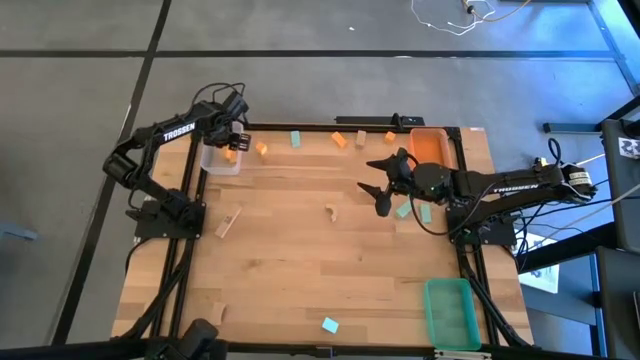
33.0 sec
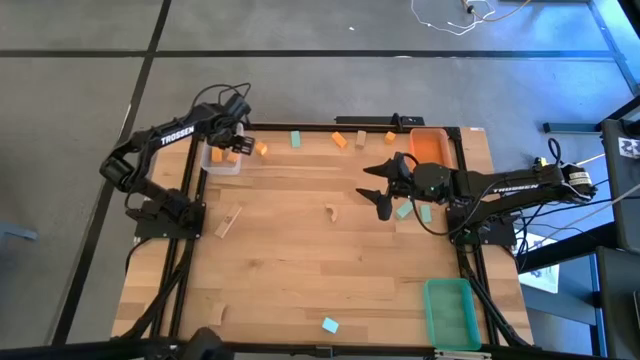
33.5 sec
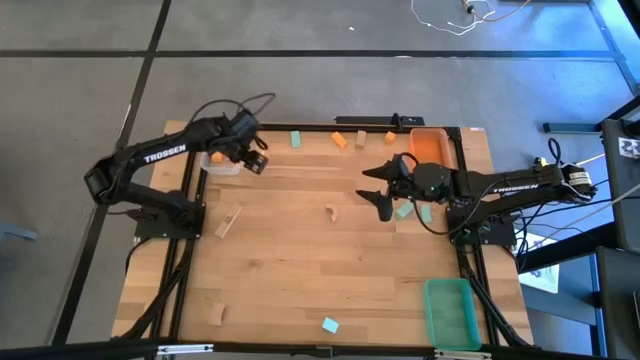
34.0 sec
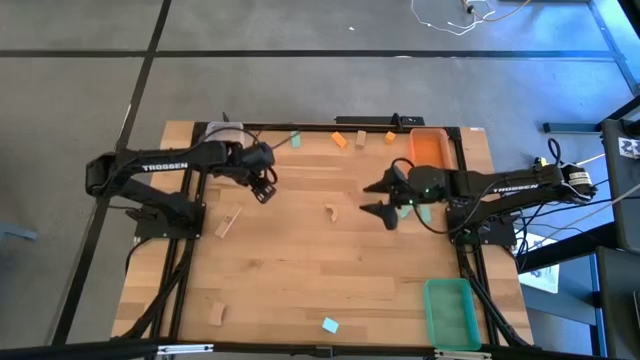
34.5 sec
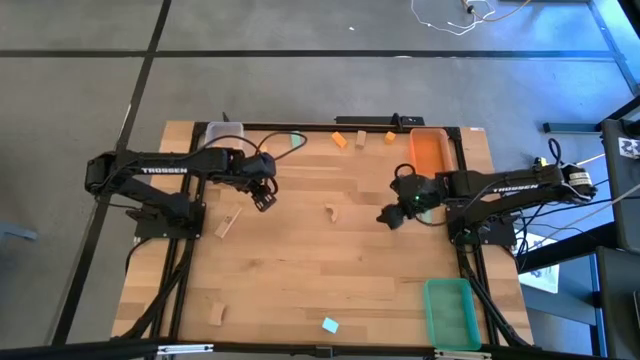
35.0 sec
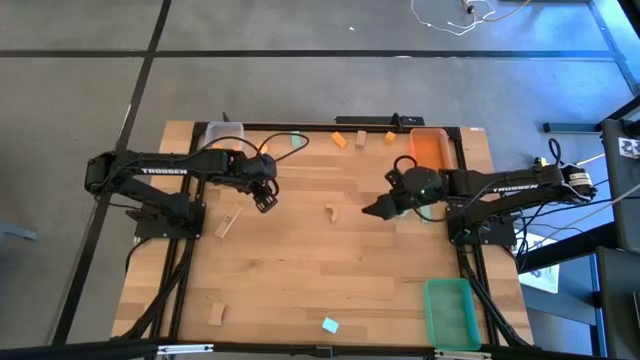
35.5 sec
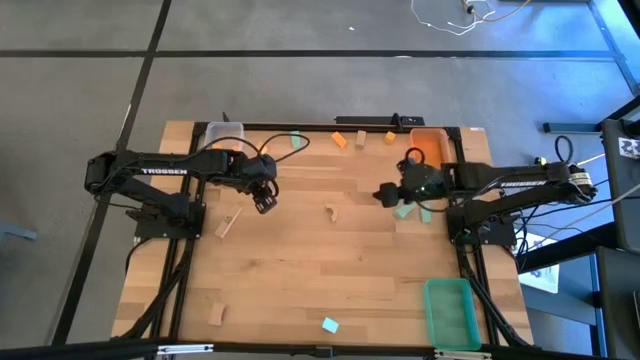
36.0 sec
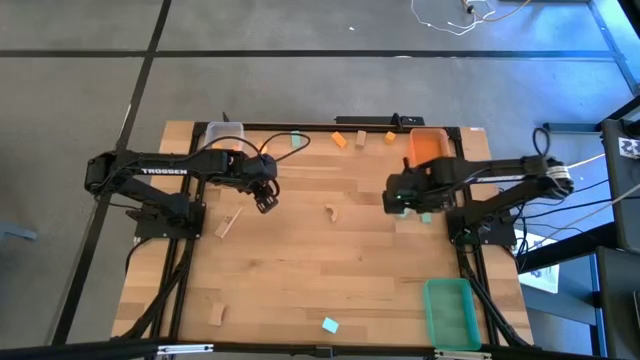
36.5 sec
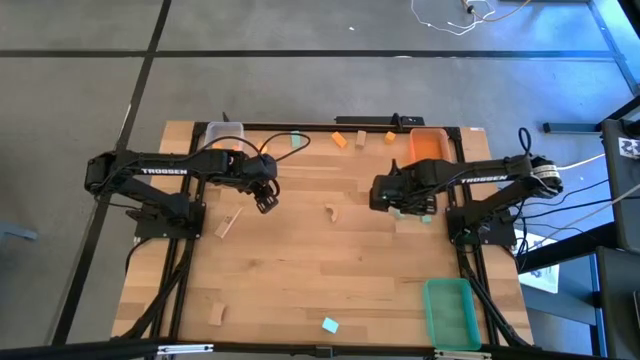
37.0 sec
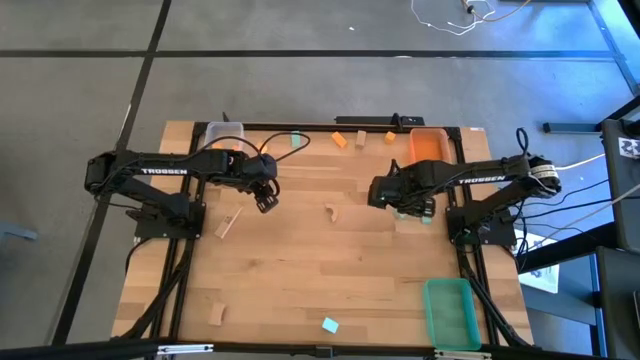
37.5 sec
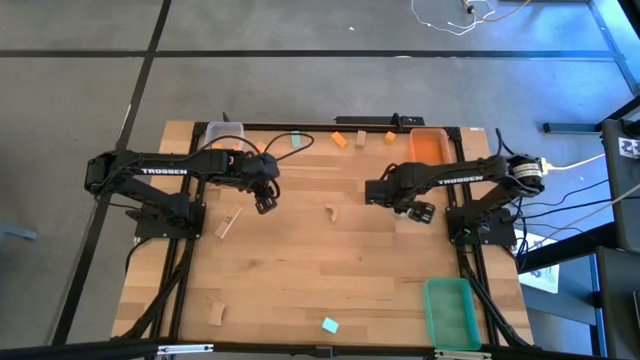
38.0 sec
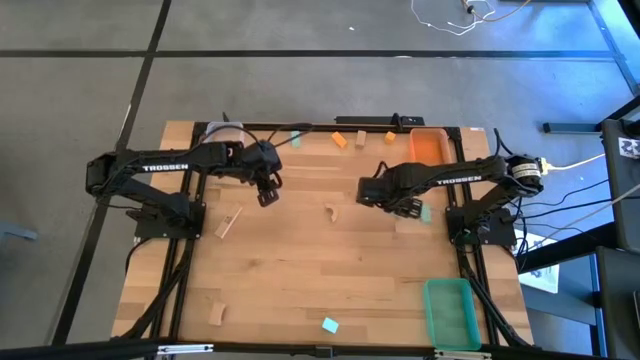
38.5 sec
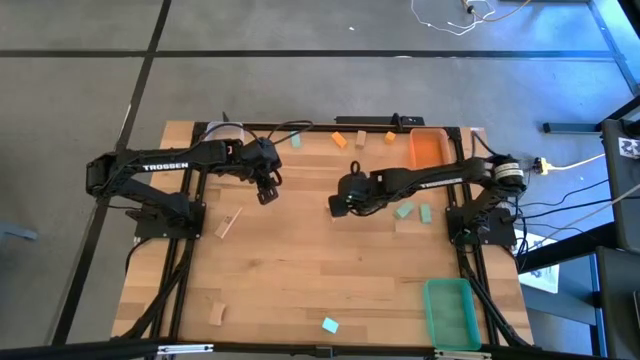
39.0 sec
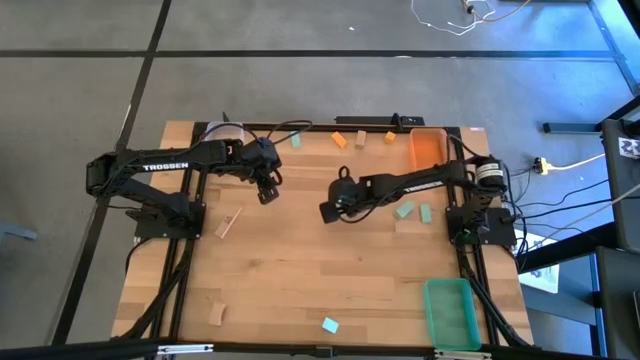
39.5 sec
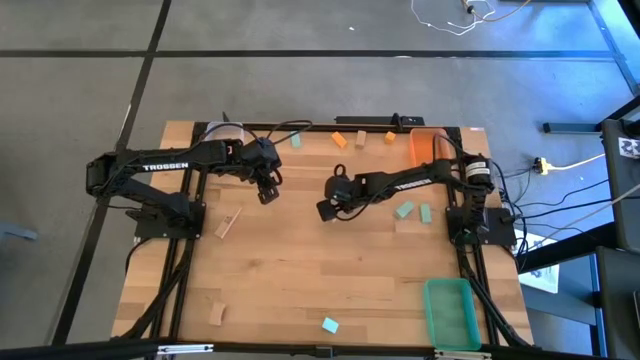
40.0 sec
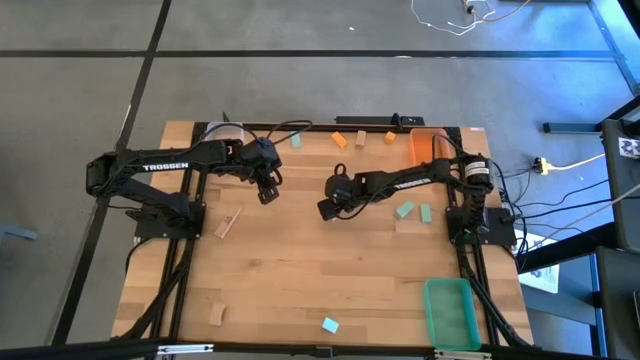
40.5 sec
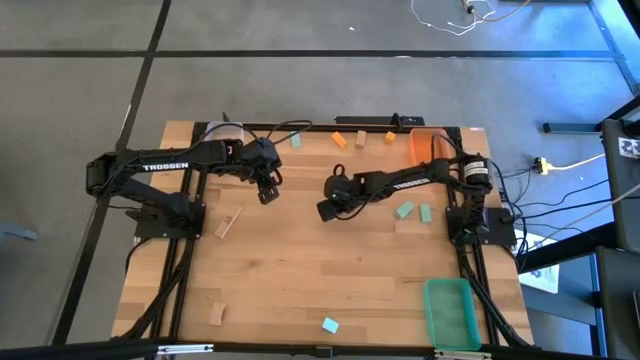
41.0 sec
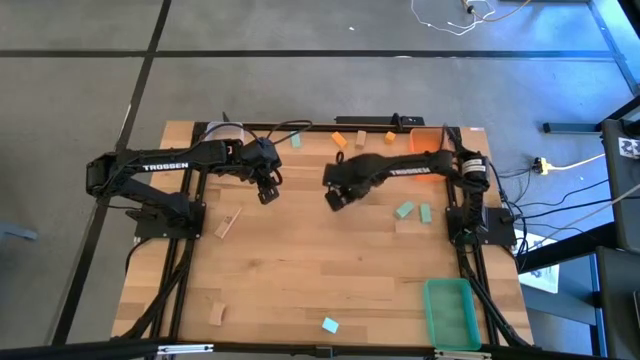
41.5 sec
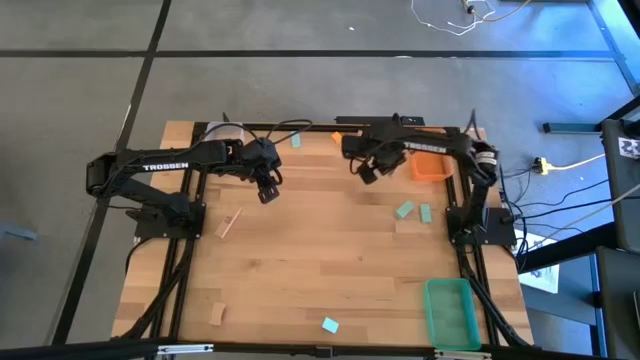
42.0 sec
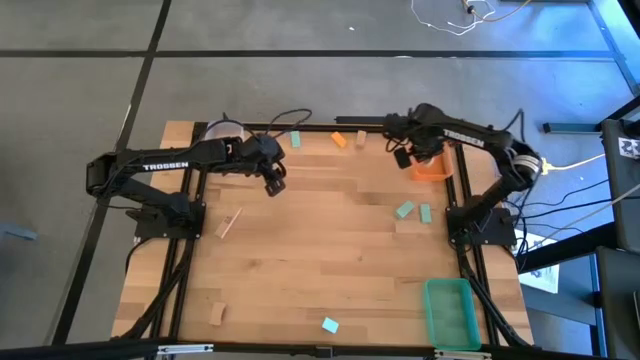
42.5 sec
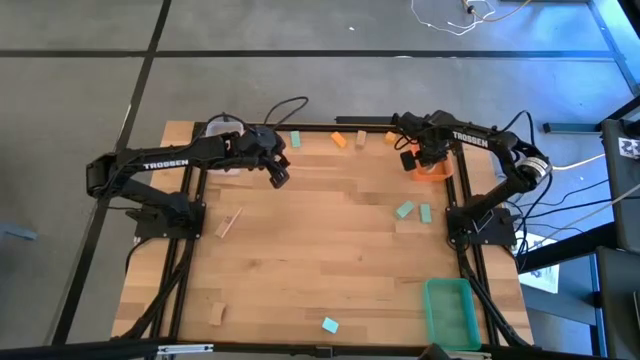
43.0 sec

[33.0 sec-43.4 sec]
Task: Sort & place blocks by color
Put the brown block into the orange bin

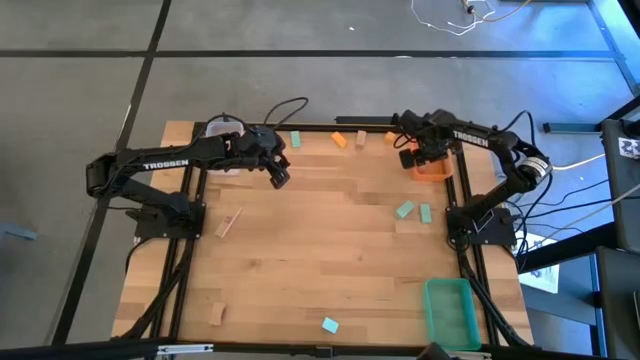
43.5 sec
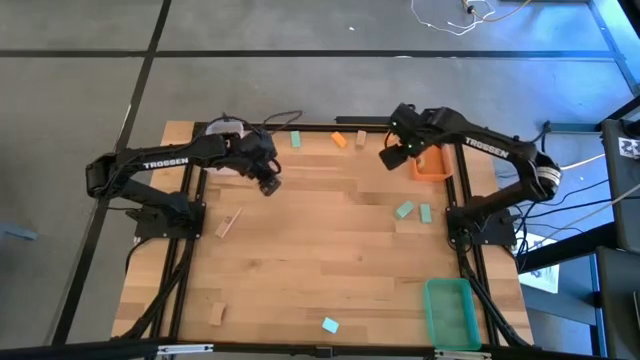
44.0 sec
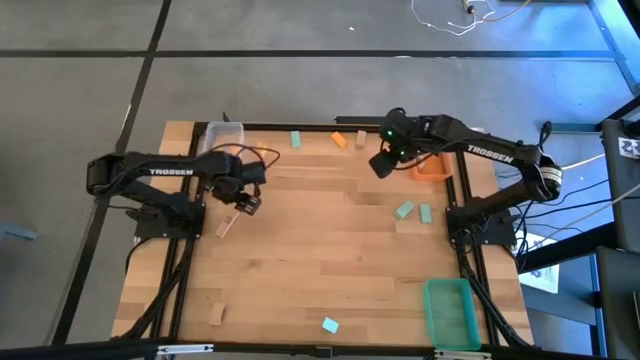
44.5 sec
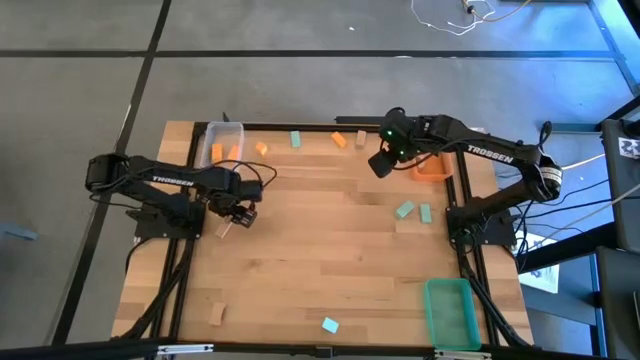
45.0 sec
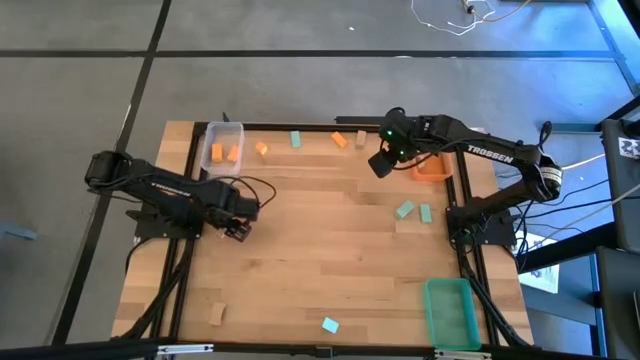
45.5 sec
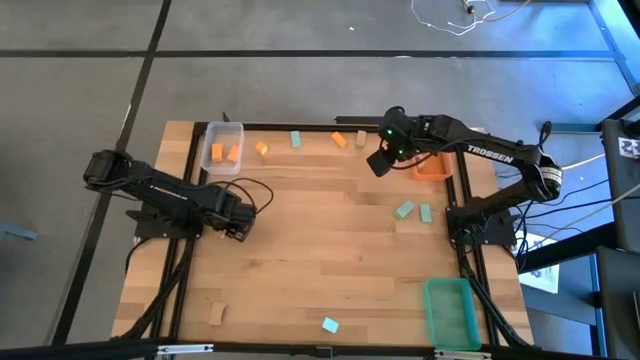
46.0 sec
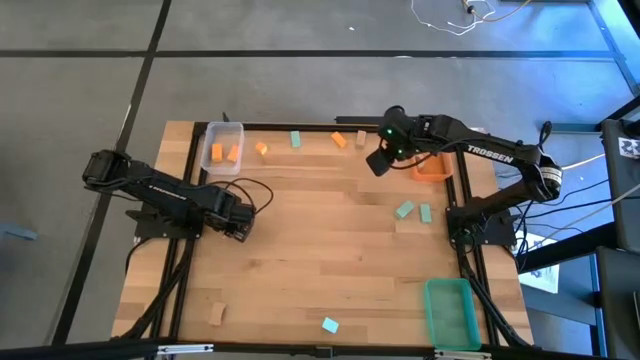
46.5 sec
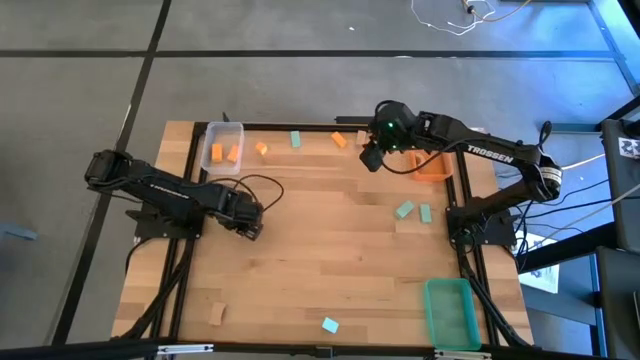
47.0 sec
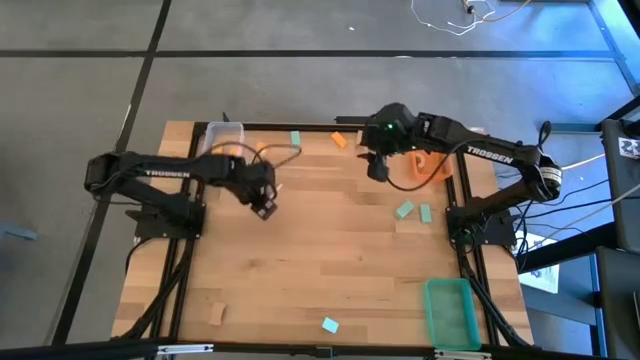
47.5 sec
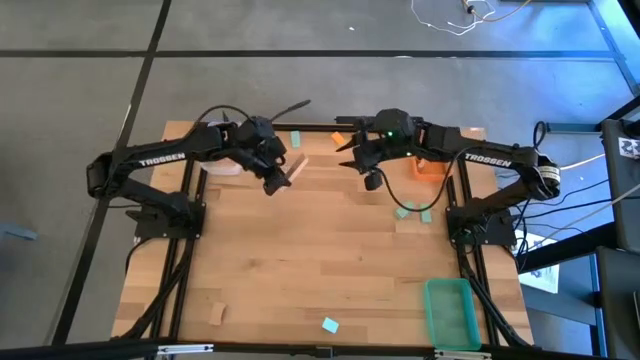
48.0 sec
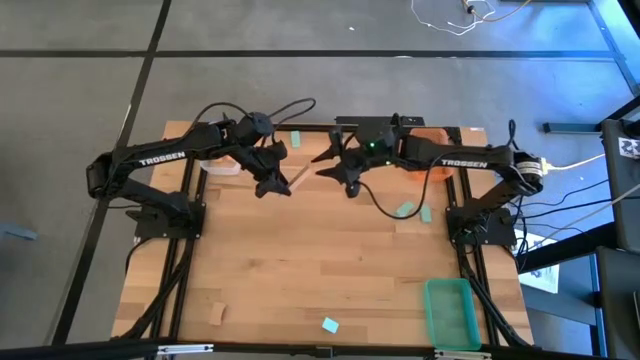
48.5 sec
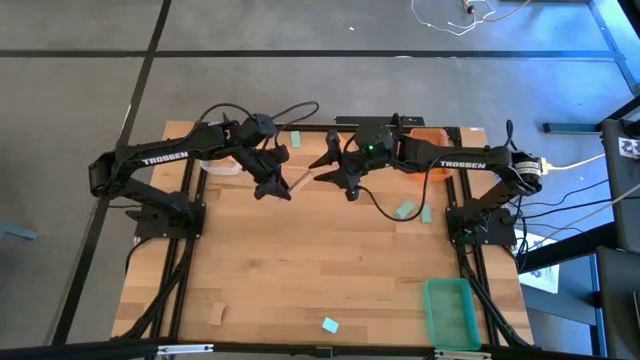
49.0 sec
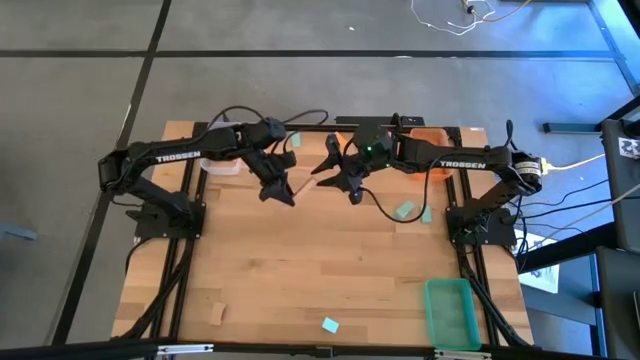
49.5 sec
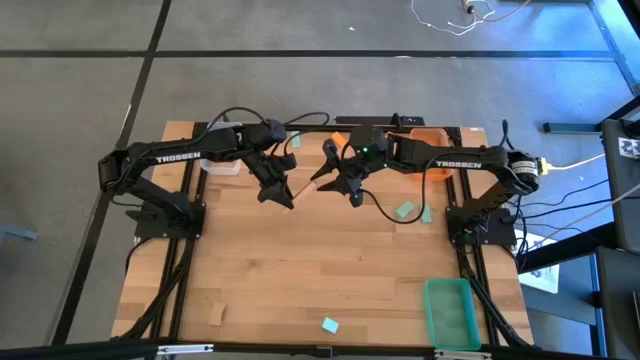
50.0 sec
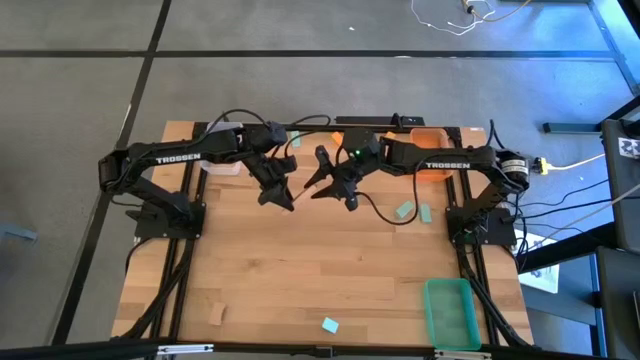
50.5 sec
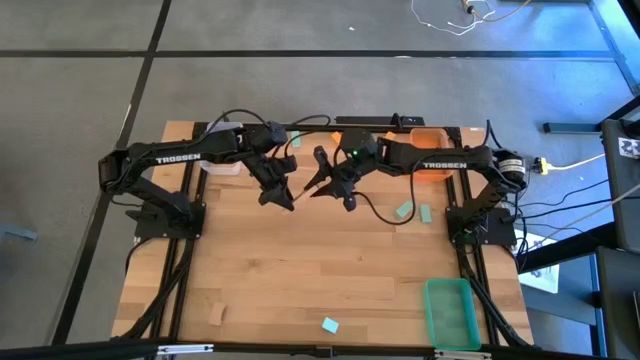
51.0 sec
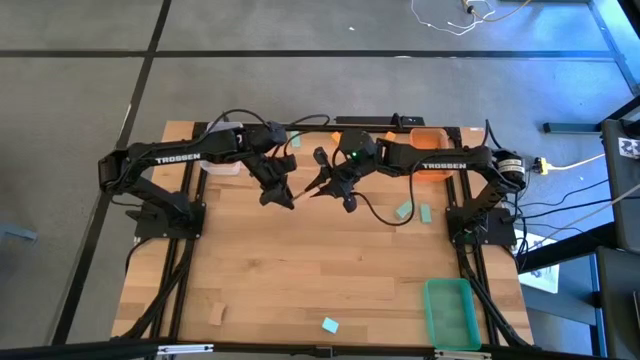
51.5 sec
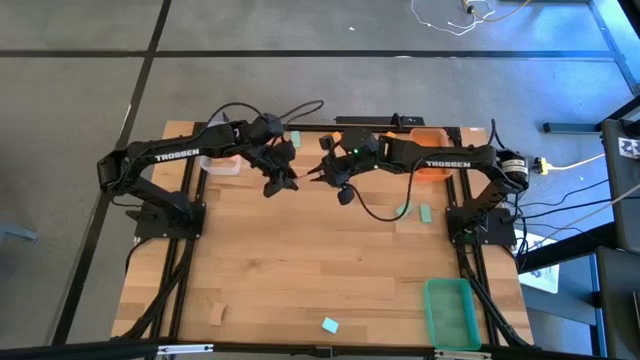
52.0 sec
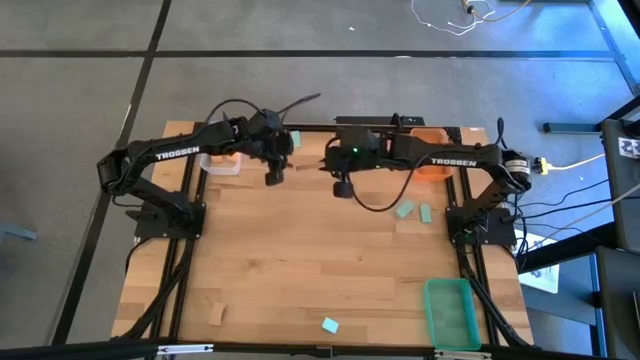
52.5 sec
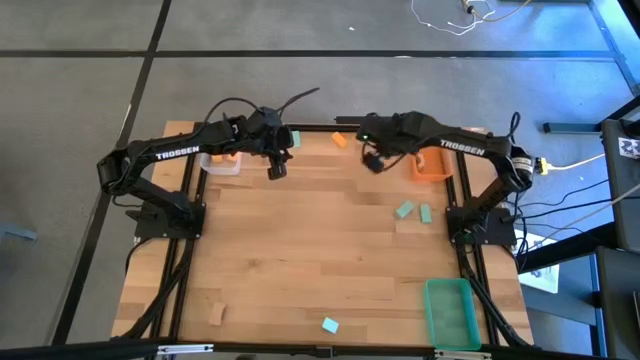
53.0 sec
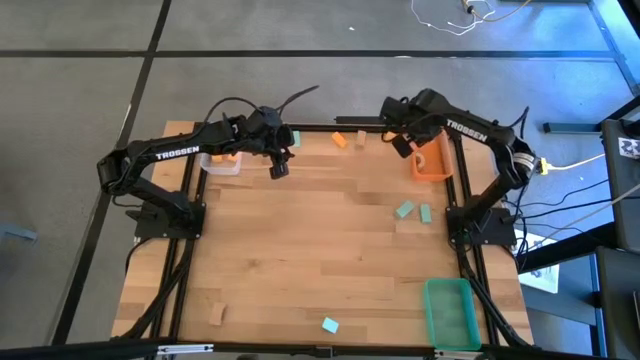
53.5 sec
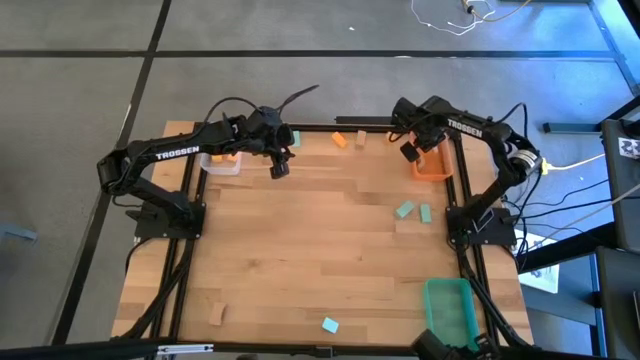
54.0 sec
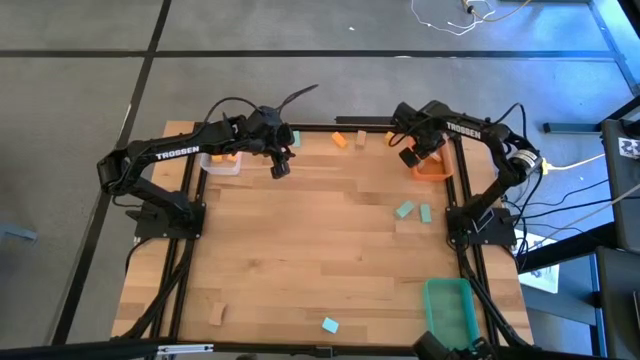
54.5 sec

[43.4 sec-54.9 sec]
Put the brown block into the orange bin
